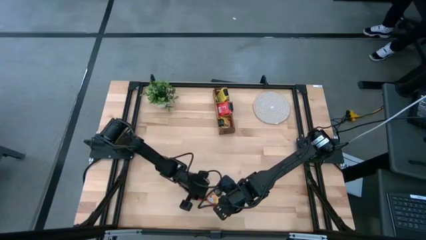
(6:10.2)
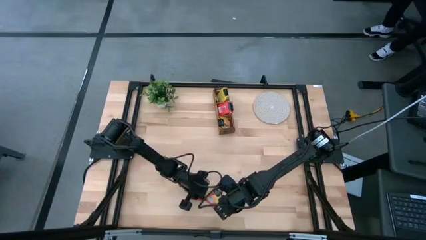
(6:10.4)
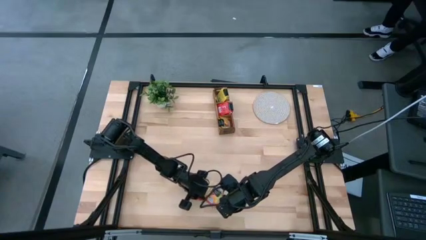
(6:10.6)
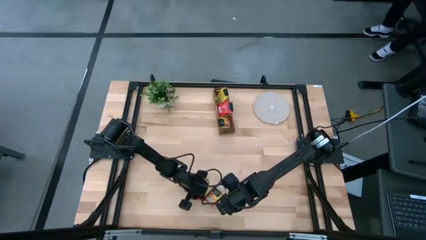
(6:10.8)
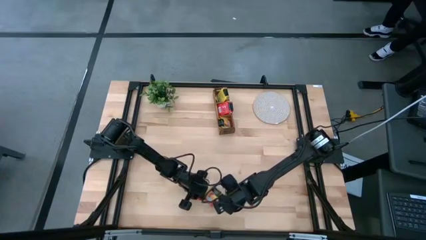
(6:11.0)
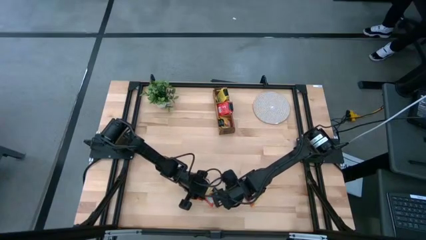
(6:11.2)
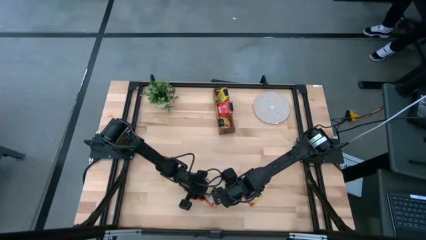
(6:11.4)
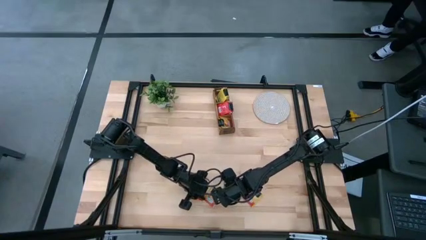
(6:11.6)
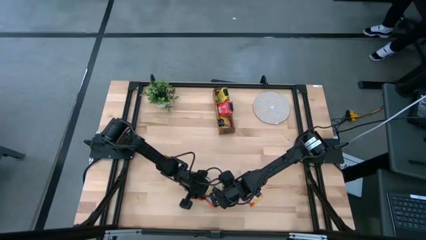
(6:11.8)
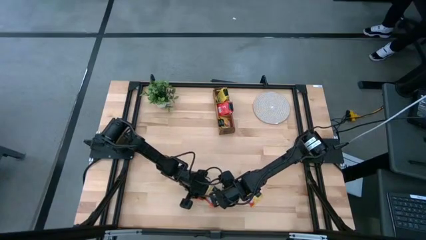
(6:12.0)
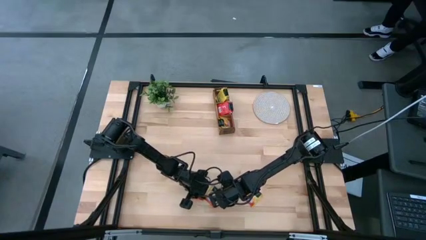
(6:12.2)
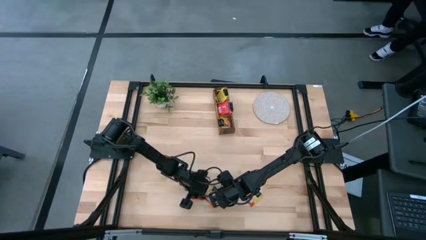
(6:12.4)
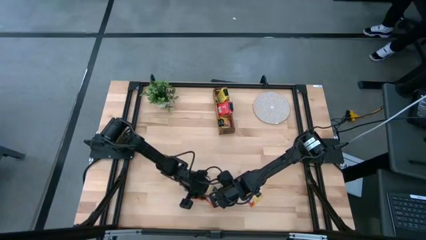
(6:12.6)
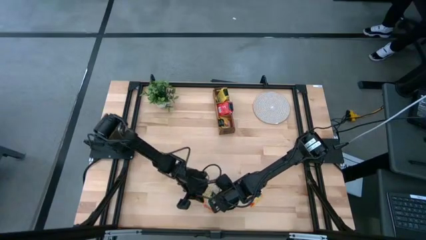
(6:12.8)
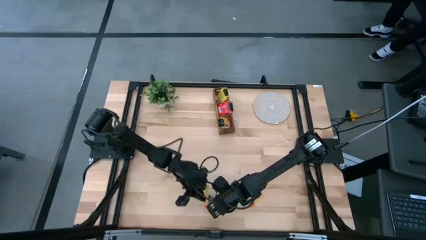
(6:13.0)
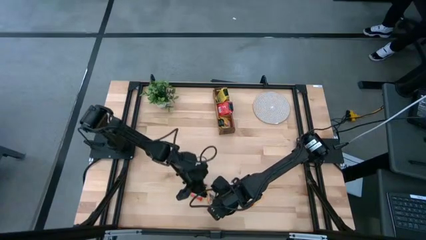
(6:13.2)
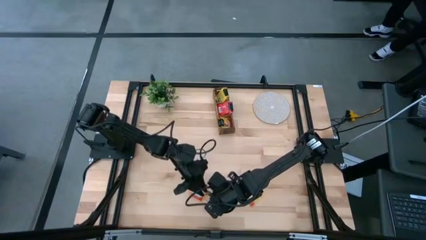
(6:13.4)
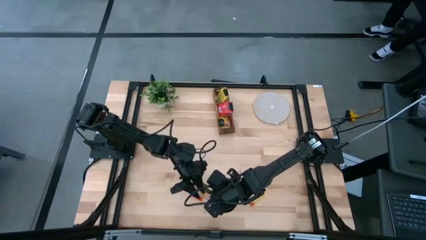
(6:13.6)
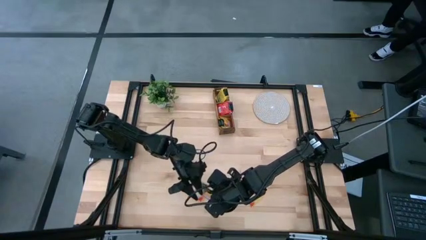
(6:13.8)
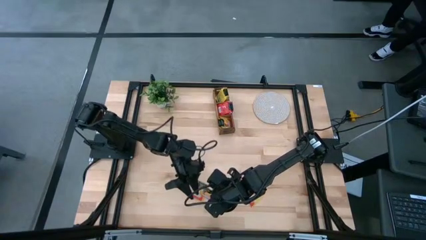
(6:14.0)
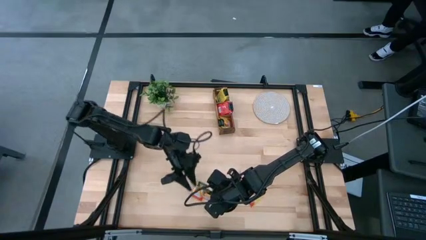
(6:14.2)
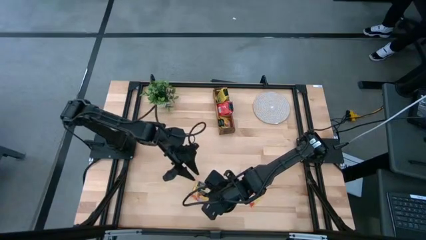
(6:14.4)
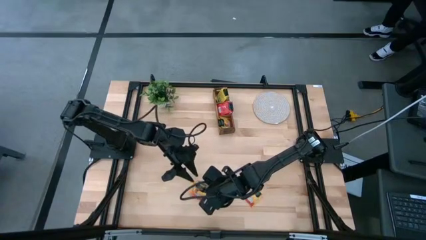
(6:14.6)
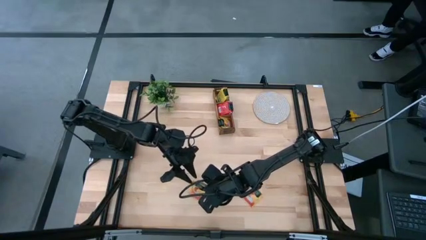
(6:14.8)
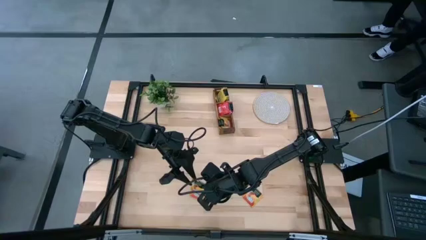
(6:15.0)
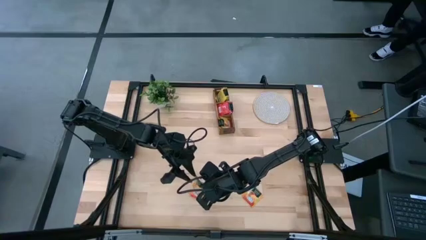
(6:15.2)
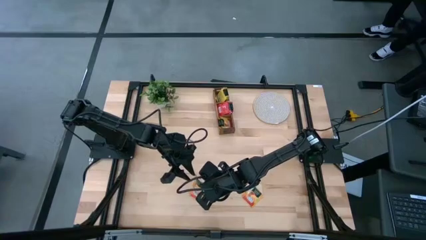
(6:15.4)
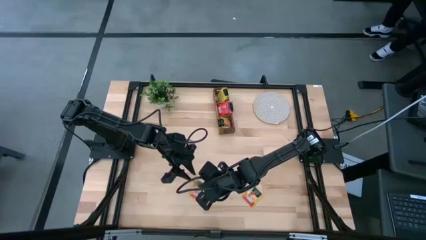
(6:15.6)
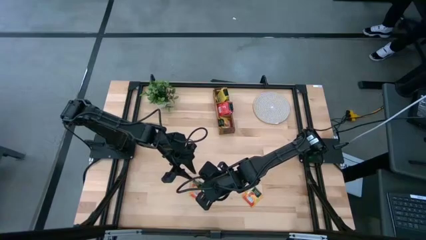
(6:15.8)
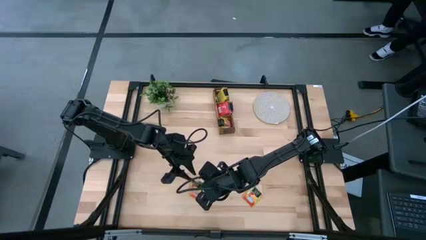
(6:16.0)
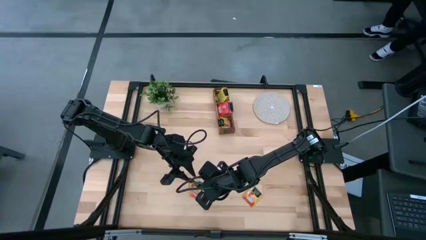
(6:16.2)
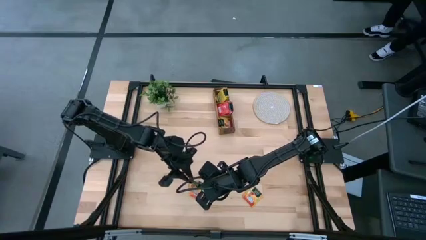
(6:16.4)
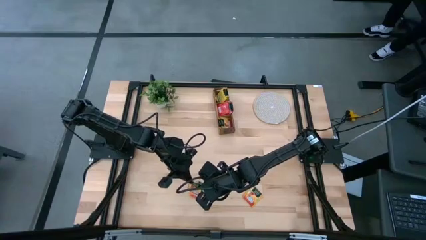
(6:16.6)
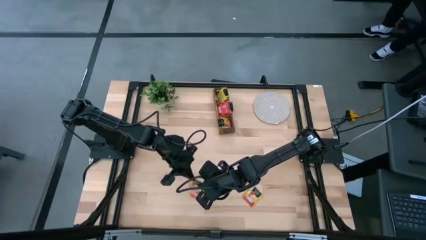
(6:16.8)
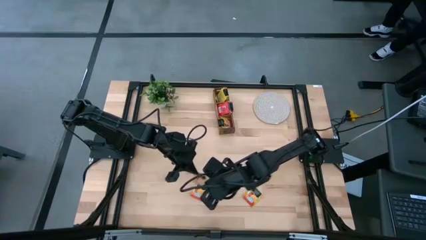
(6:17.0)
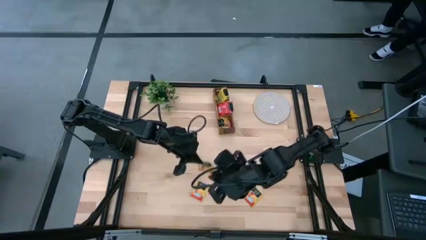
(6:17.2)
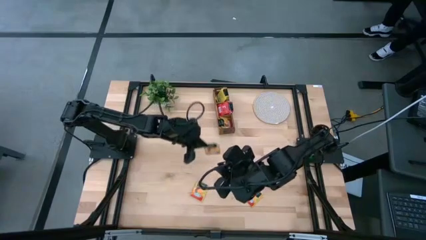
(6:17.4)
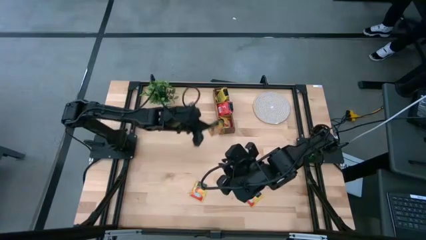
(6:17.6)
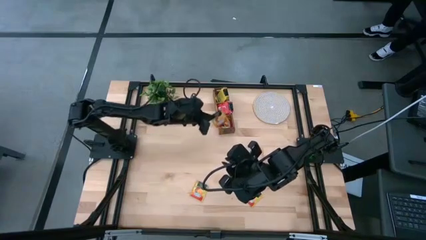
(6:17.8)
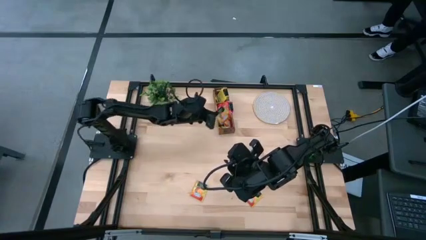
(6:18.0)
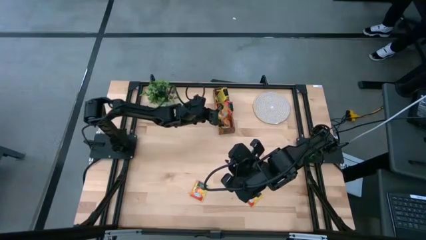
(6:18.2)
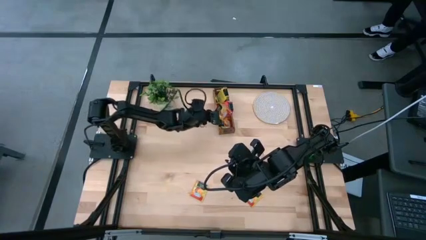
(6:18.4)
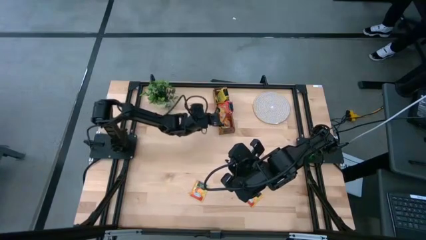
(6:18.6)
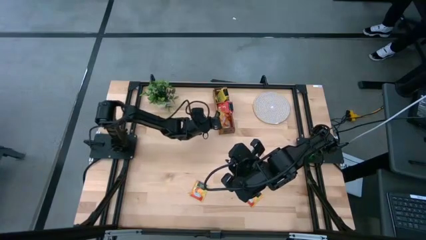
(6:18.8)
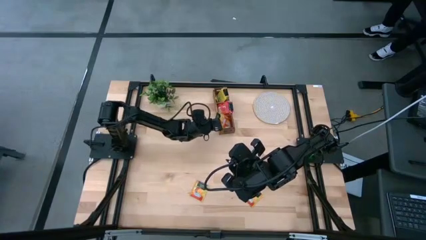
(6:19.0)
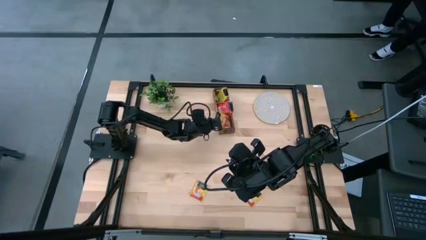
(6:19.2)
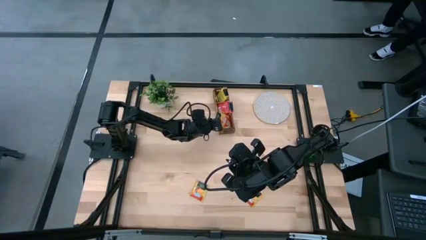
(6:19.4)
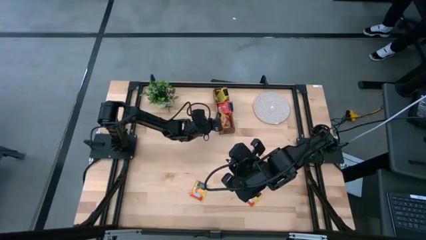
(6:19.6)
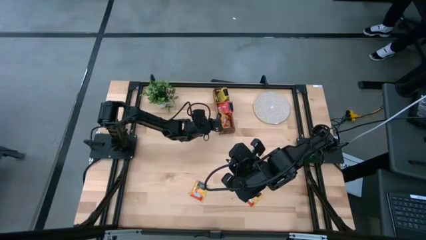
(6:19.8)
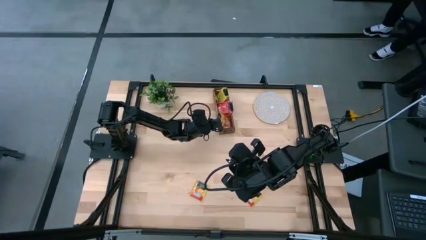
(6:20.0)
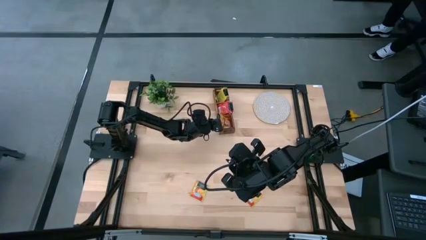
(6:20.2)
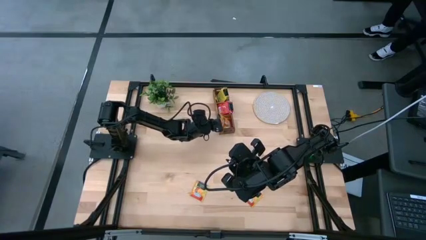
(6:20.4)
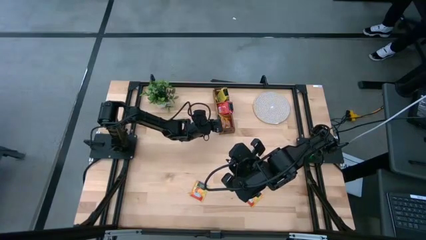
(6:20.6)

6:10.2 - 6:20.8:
Task: Pick & Place Tea
Put the orange tea bag into the left section of the wooden organizer

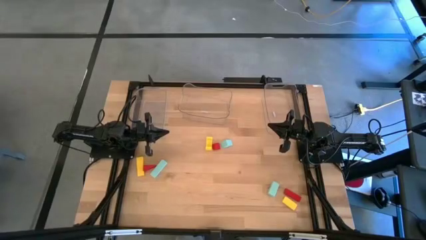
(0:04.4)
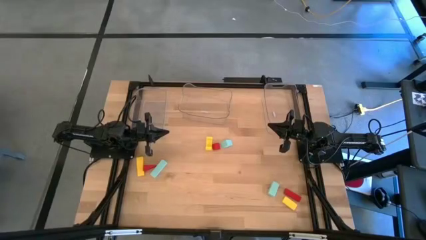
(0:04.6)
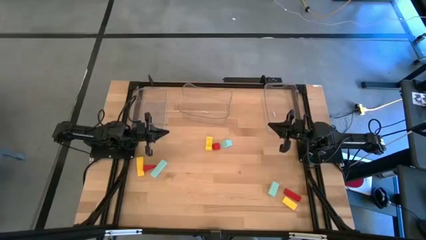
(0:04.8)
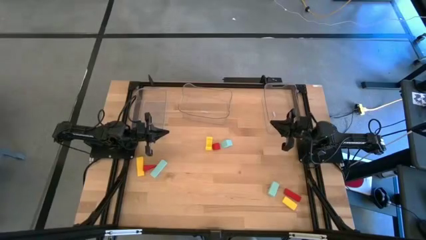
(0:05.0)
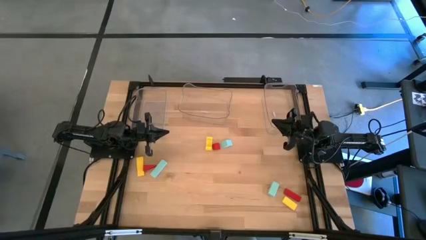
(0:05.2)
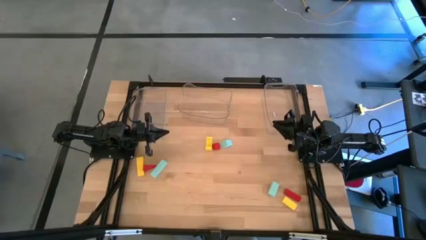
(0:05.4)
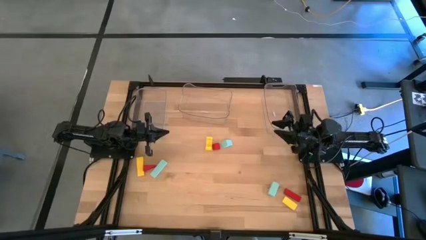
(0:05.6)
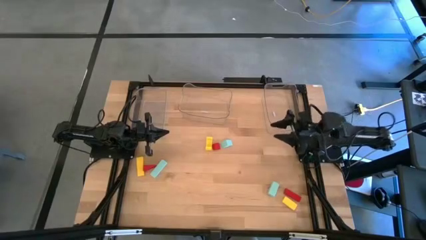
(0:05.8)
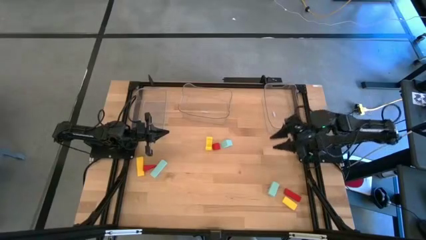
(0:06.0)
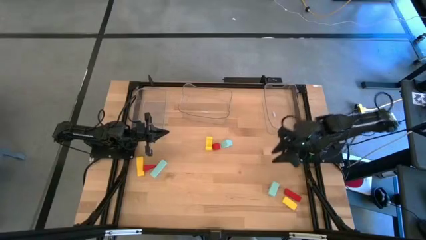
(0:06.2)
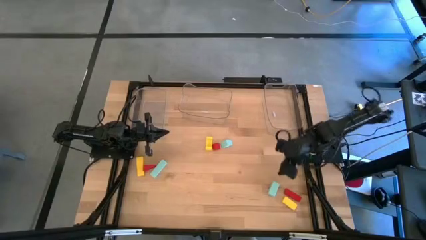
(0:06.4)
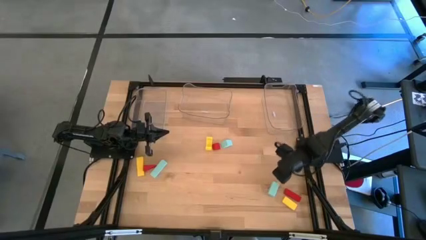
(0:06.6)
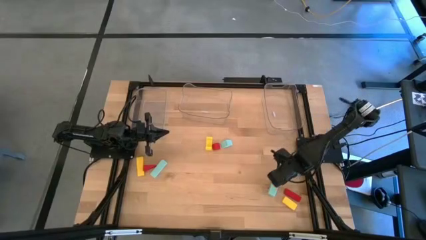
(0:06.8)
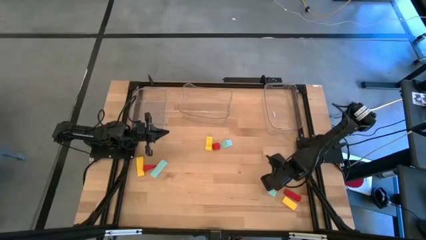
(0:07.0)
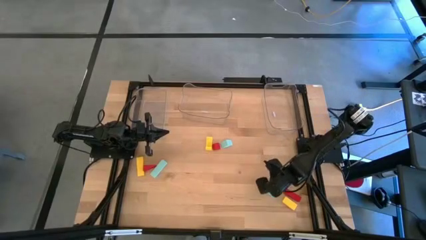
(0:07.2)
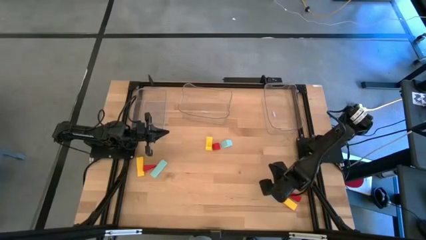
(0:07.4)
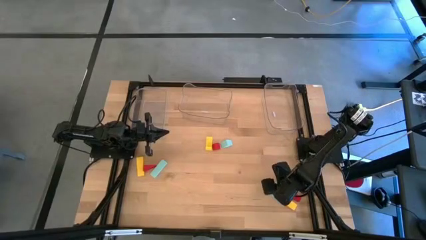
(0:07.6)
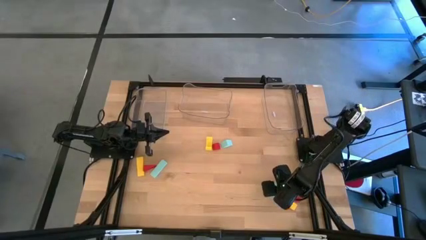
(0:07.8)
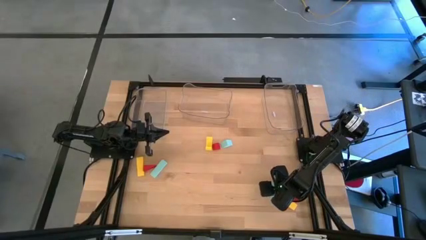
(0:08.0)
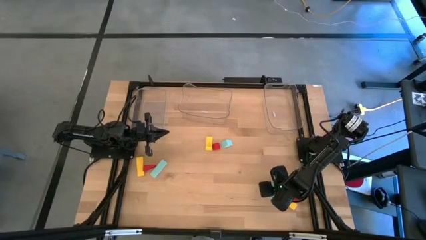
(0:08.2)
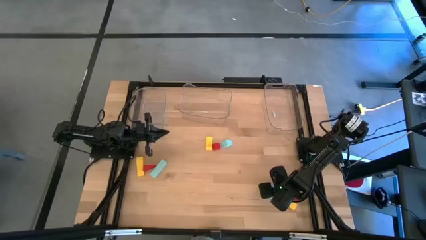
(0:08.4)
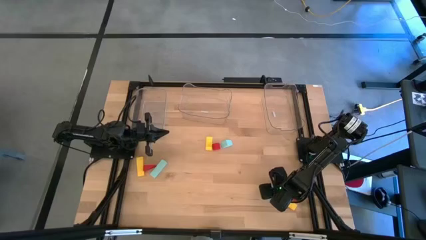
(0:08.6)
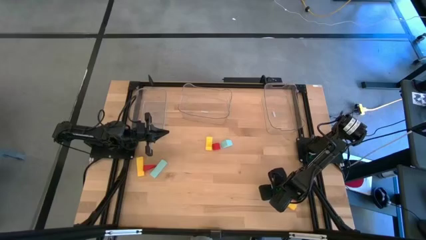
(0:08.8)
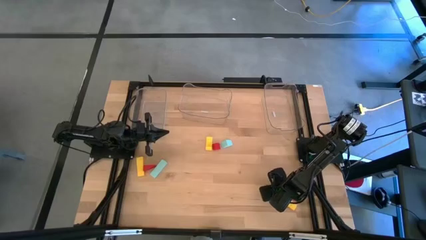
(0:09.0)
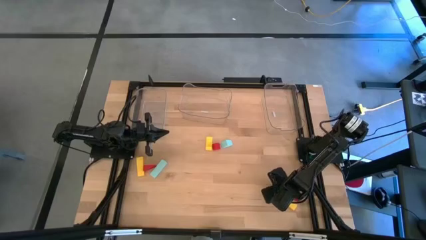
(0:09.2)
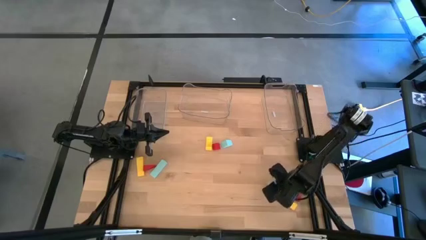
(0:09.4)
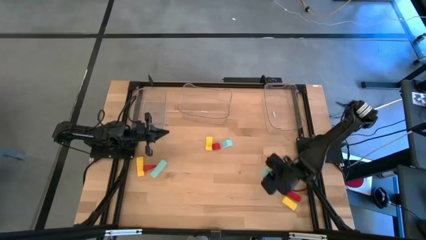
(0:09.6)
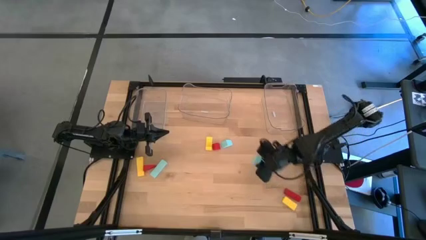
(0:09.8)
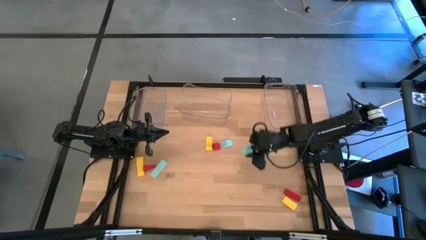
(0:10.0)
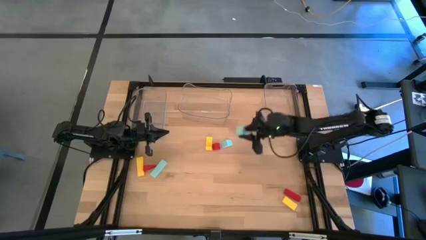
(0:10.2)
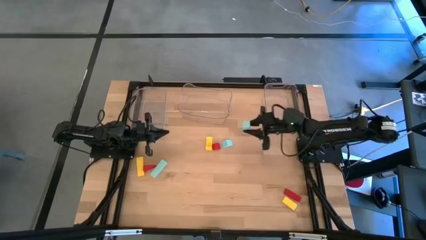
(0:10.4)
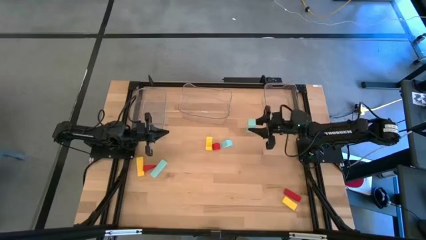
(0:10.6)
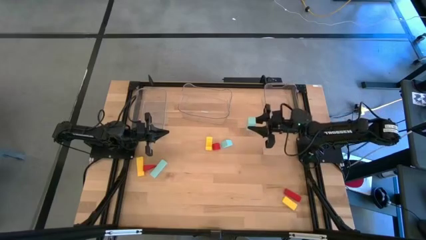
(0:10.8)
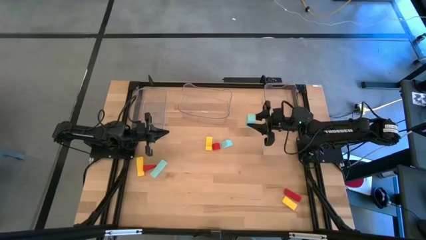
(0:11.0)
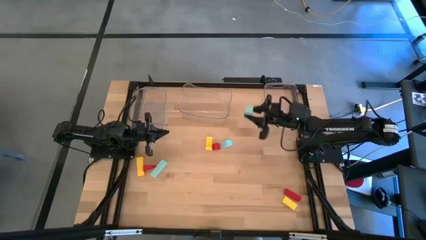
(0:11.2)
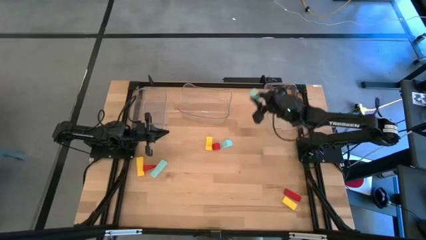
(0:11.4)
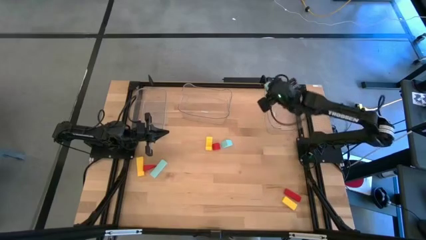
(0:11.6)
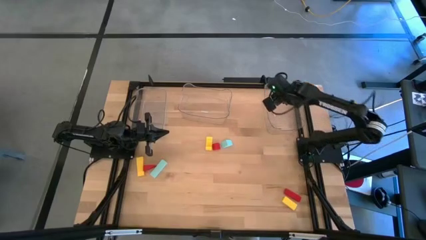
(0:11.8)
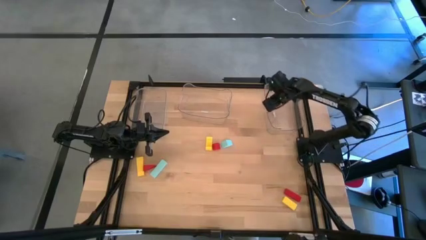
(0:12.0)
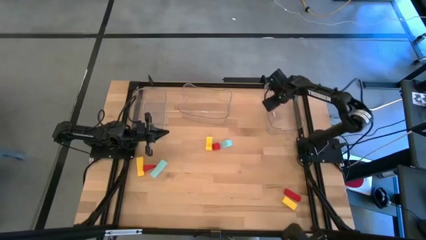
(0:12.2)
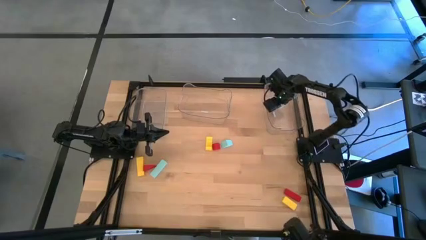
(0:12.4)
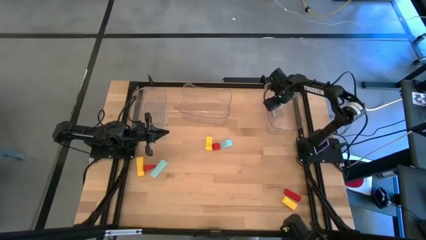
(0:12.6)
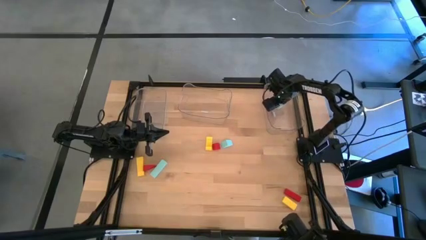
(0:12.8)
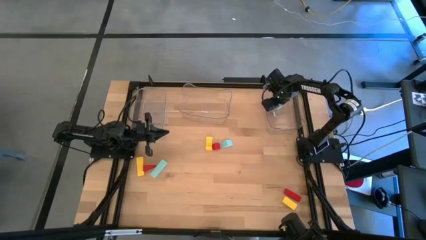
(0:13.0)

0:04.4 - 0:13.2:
Task: Sort & place blocks by color
Put the right light blue block into the right transparent bin
